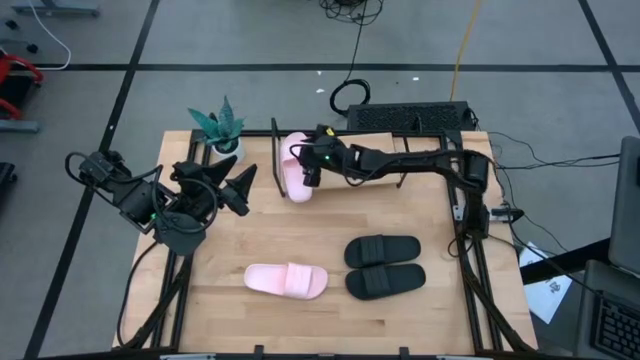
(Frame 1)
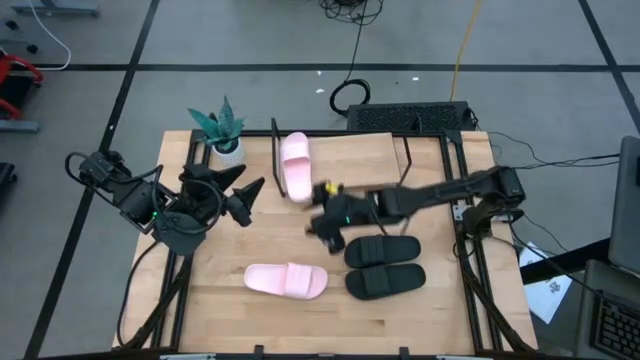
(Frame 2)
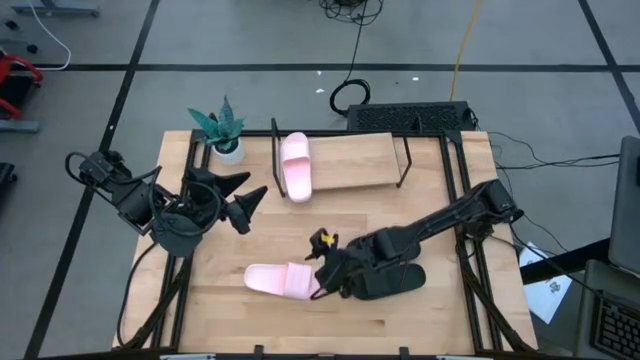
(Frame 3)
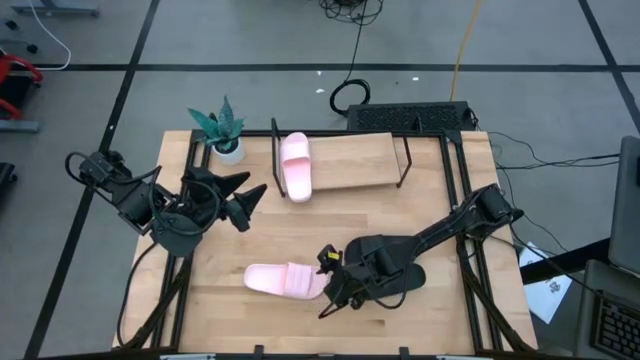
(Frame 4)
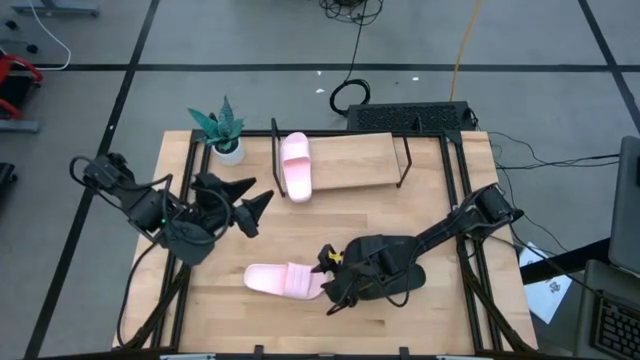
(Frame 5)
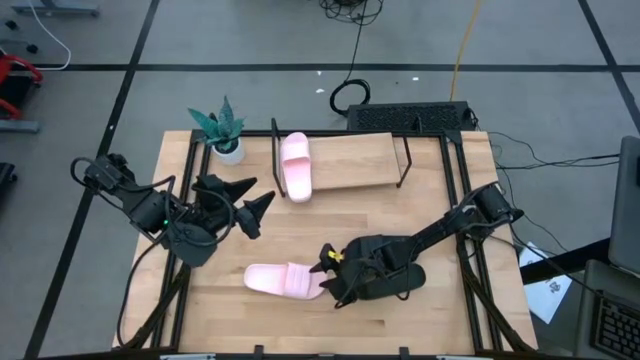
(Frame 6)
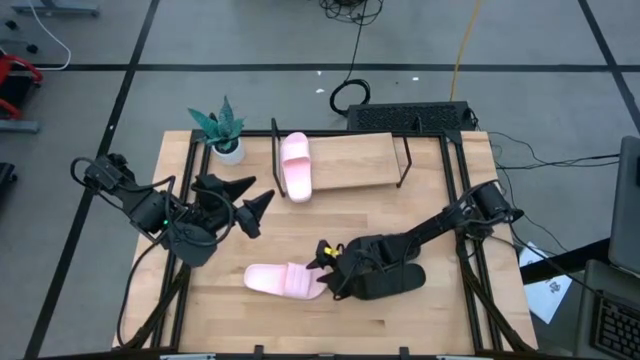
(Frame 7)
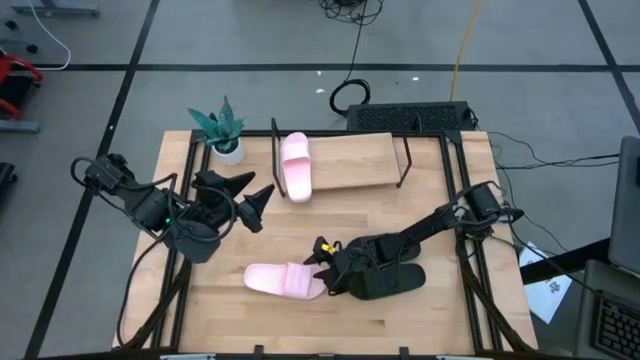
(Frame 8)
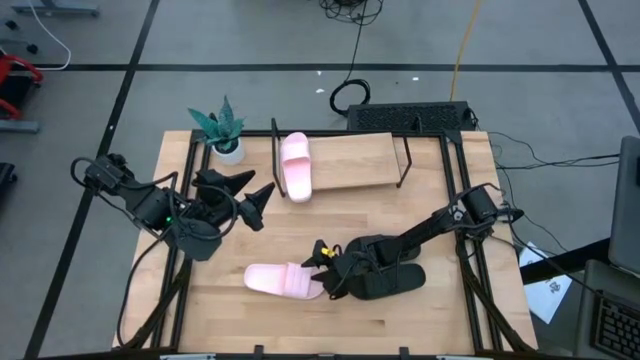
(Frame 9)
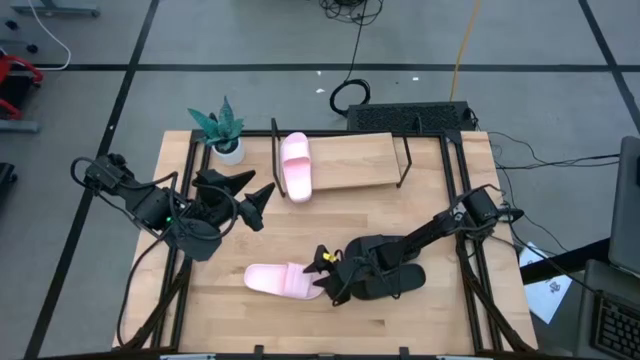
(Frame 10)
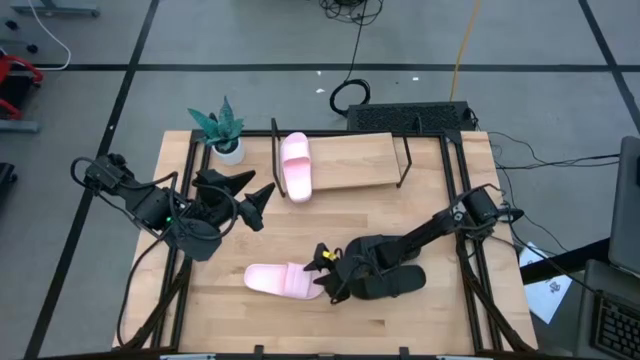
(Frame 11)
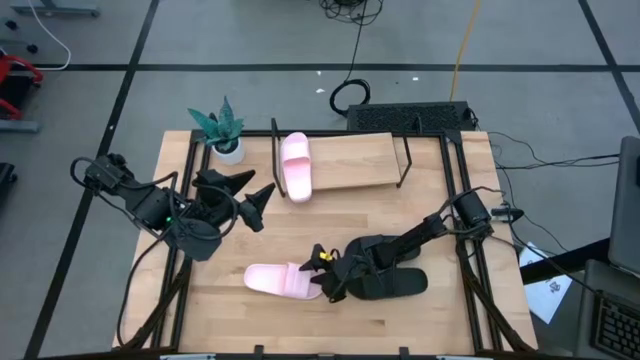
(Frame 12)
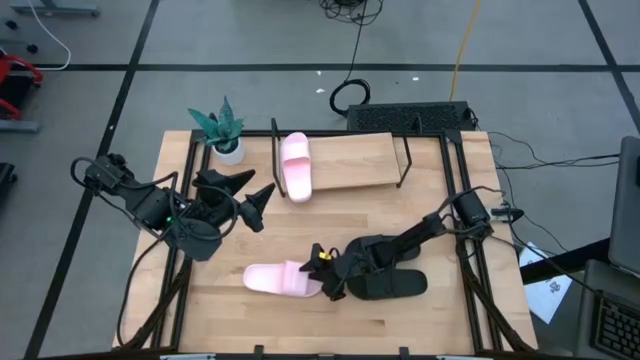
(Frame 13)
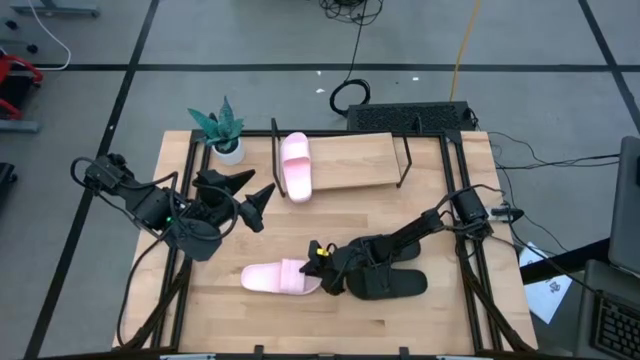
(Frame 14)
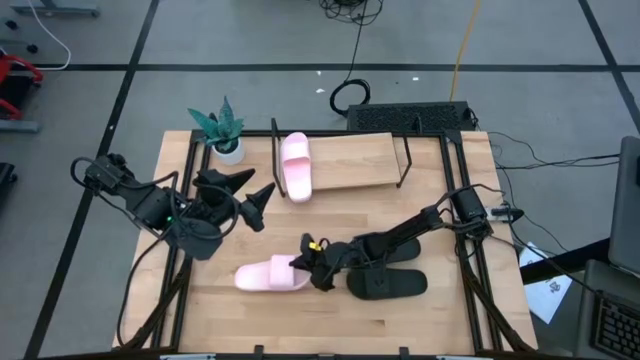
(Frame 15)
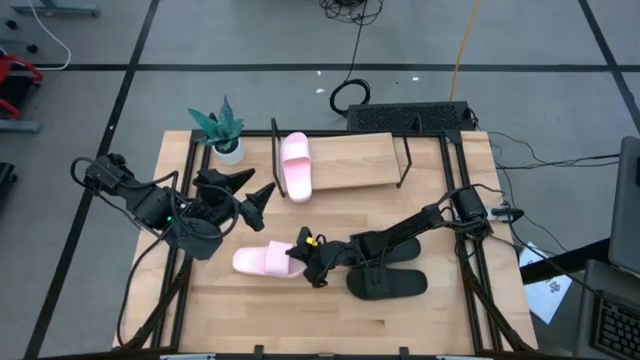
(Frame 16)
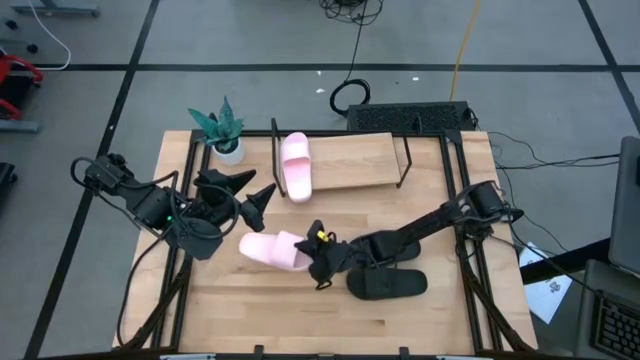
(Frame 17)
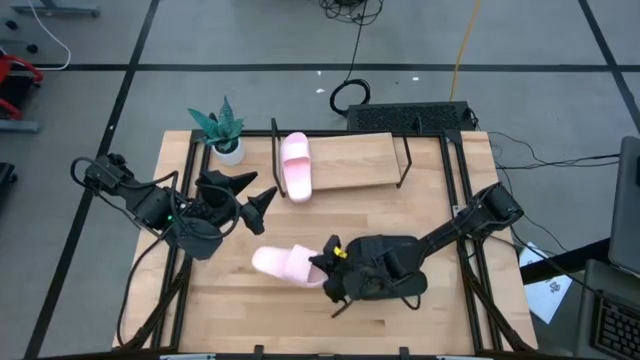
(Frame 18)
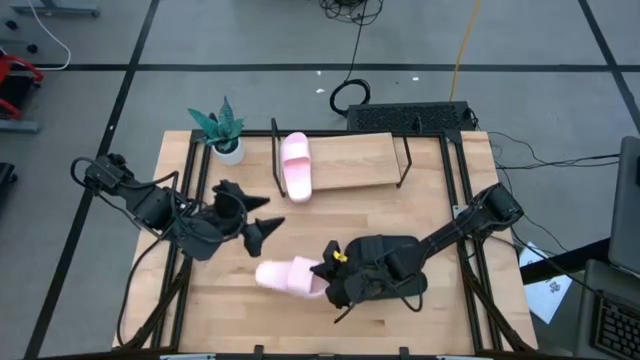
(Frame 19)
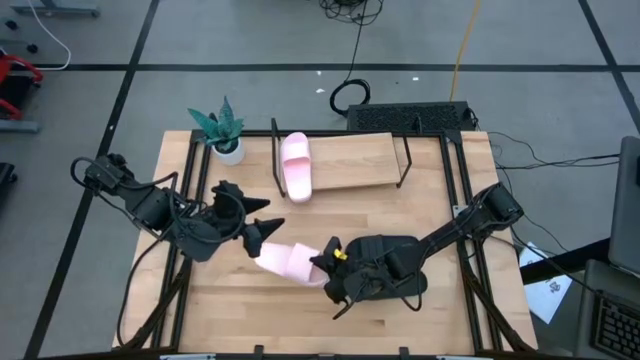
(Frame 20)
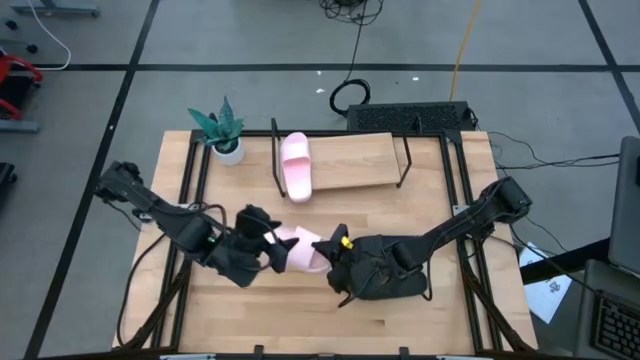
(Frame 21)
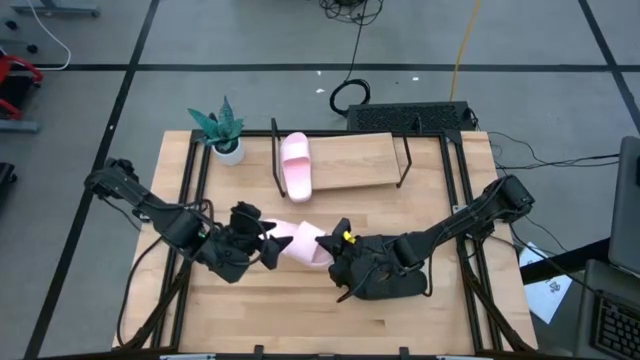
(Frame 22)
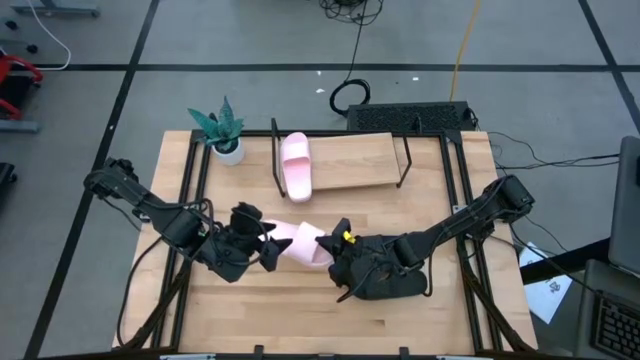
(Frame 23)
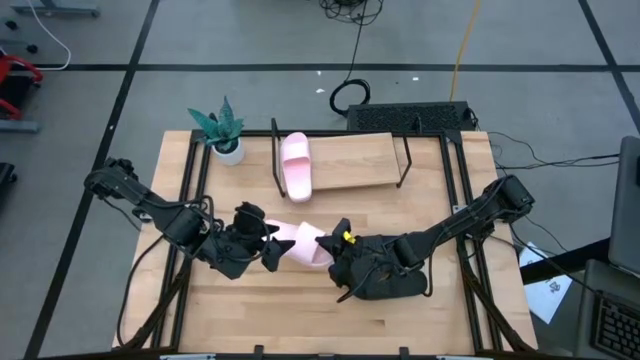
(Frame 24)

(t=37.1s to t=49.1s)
Task: Pick and place slides into the shelf
Put the pink slide on the shelf

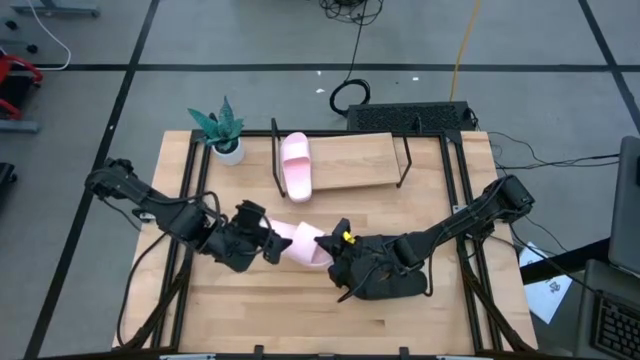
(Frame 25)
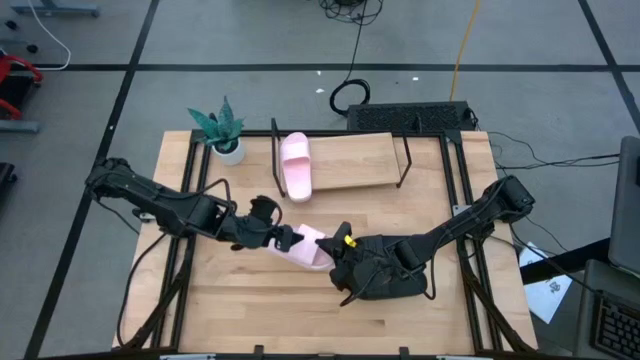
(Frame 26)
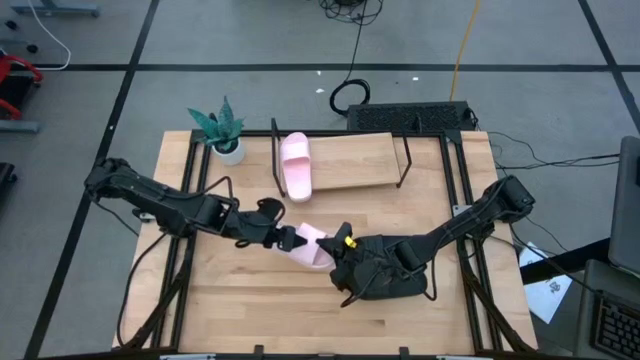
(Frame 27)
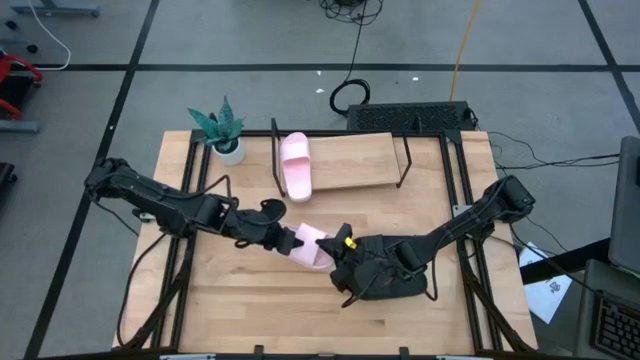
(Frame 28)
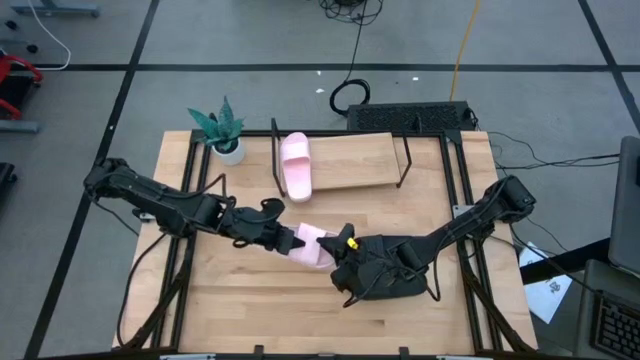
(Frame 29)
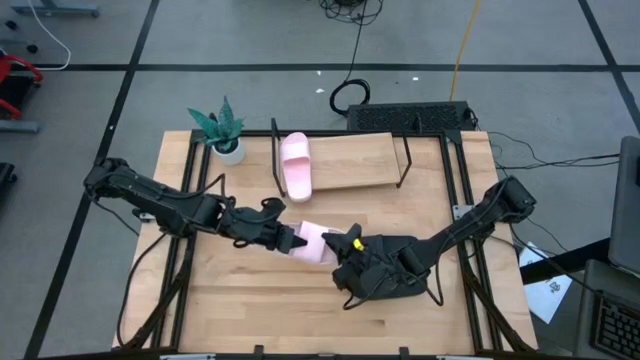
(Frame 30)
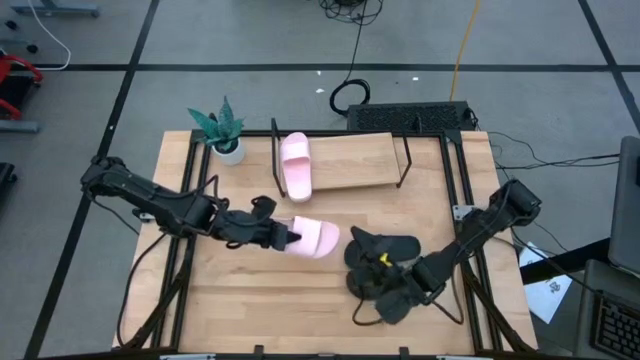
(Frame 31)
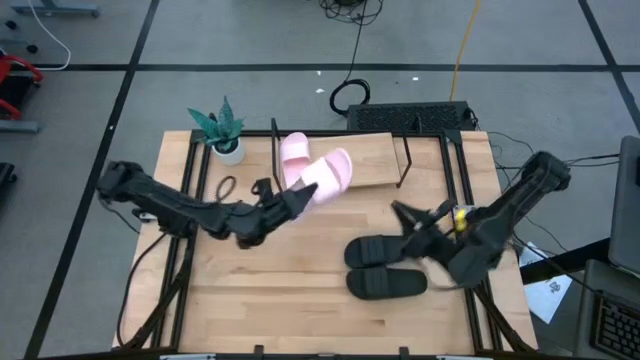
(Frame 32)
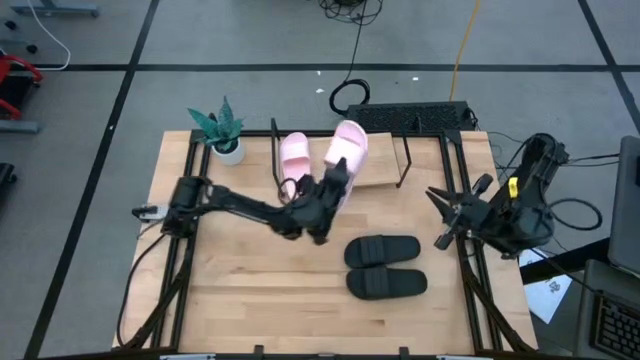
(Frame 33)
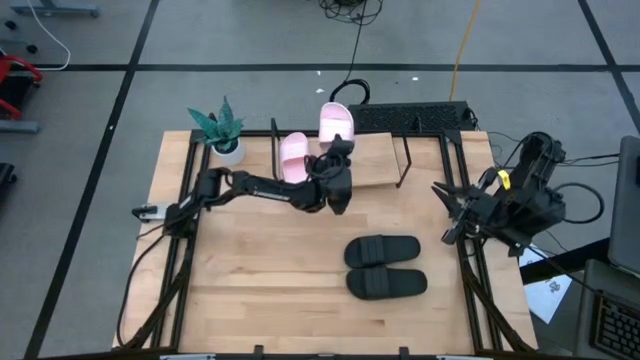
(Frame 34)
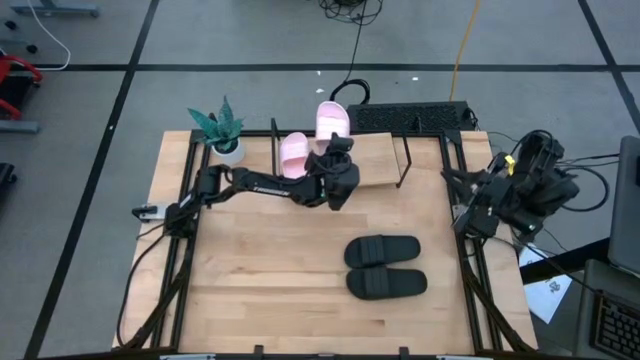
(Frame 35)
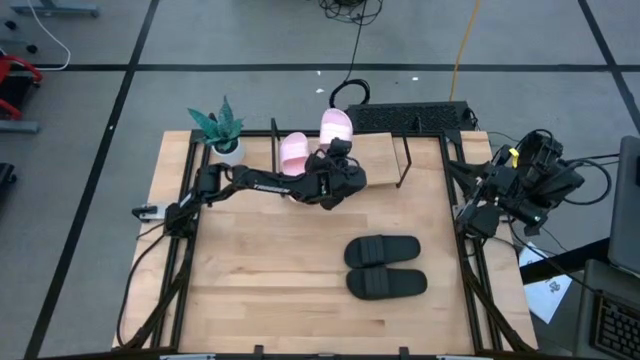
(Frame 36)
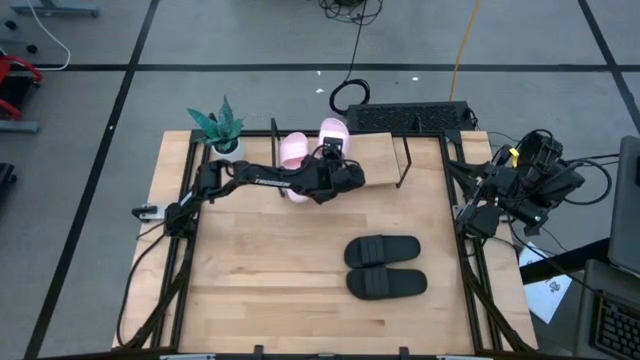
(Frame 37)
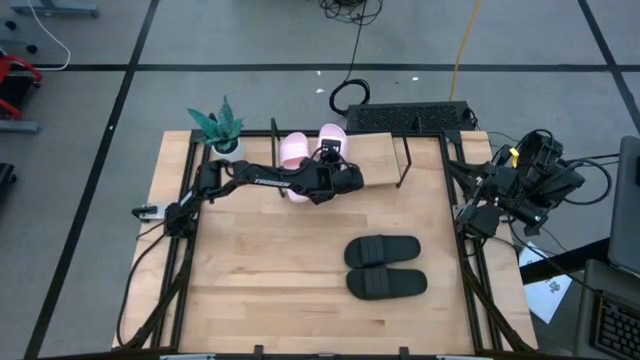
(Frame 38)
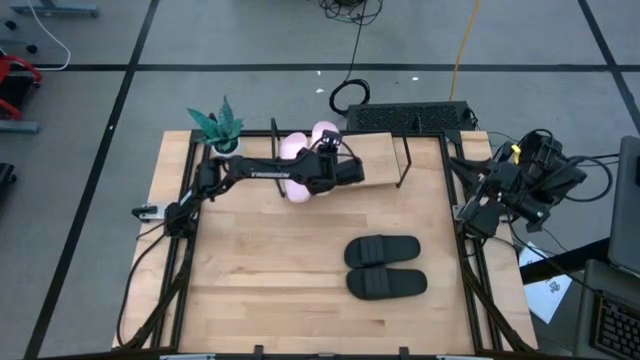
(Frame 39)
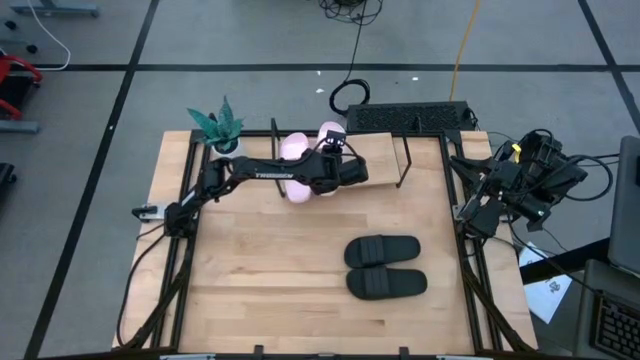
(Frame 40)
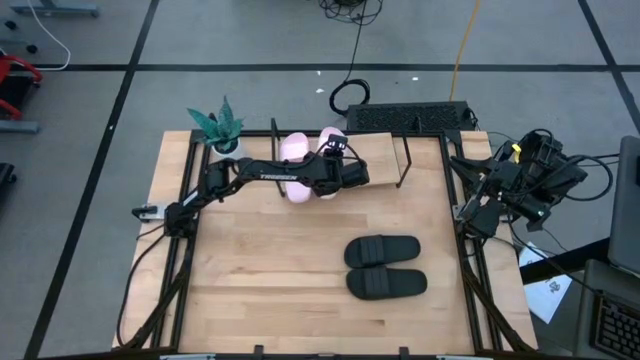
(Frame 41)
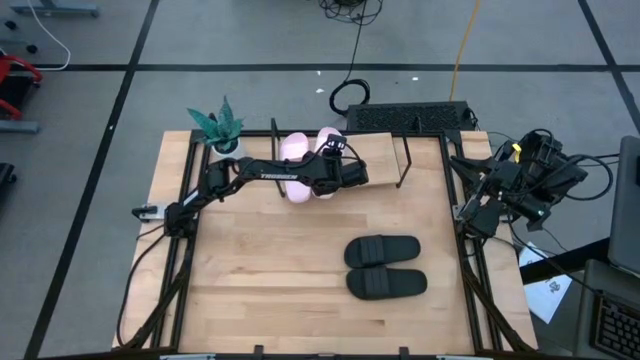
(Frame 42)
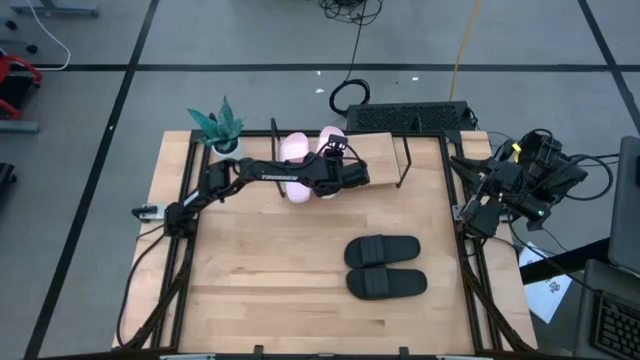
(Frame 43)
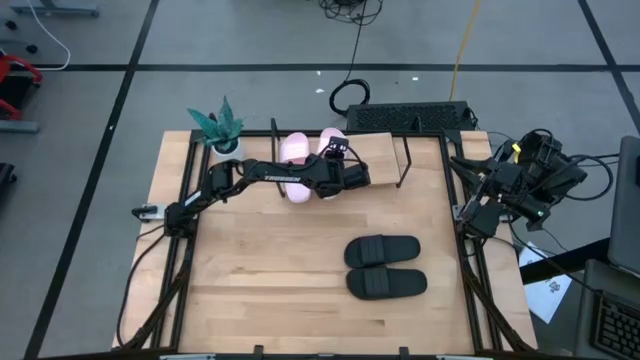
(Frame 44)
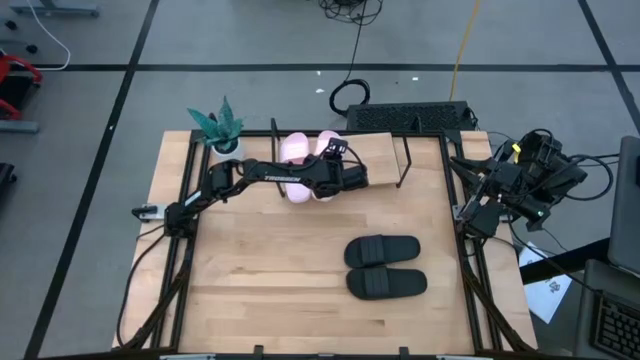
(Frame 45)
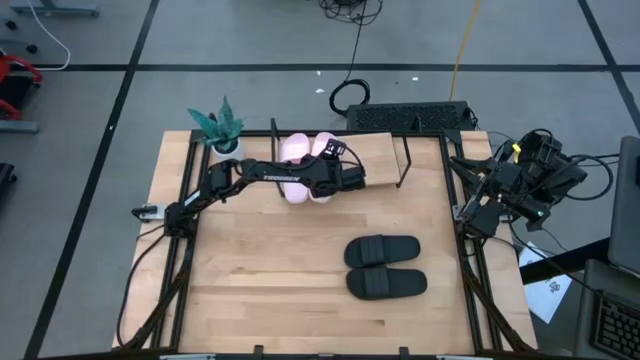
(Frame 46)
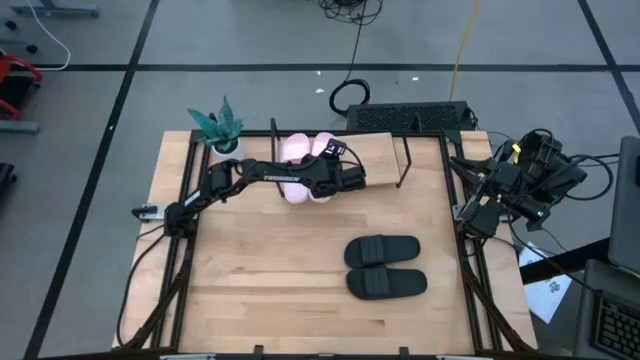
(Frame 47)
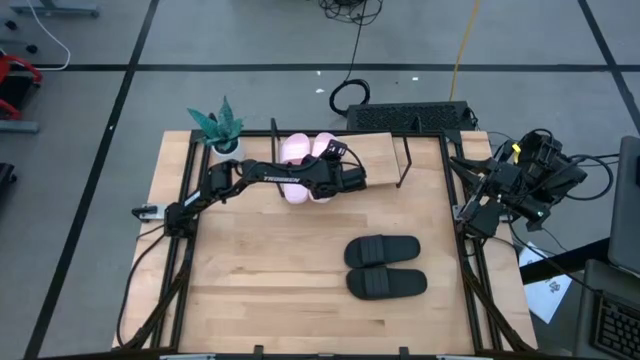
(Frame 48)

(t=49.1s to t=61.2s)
Put the pink slide on the shelf
